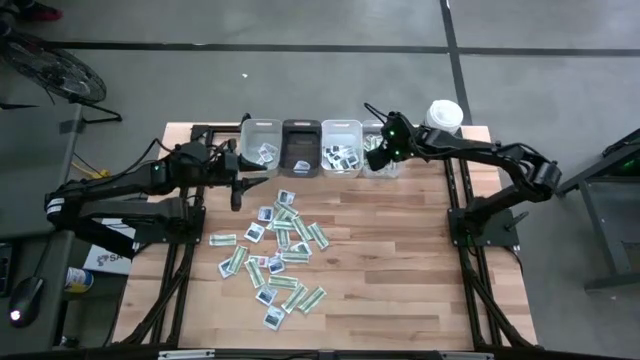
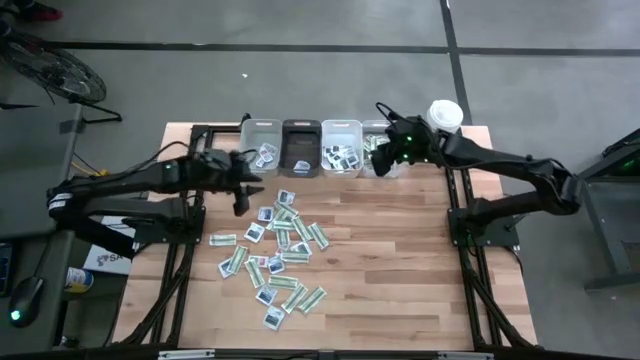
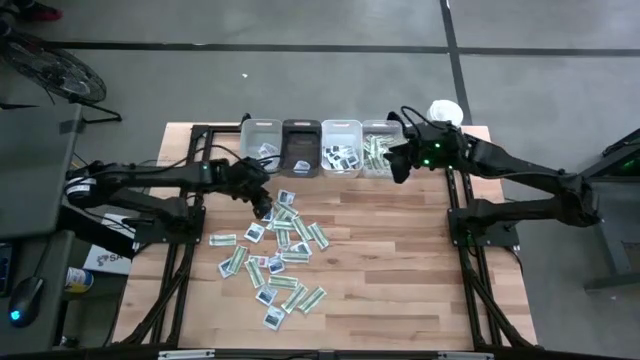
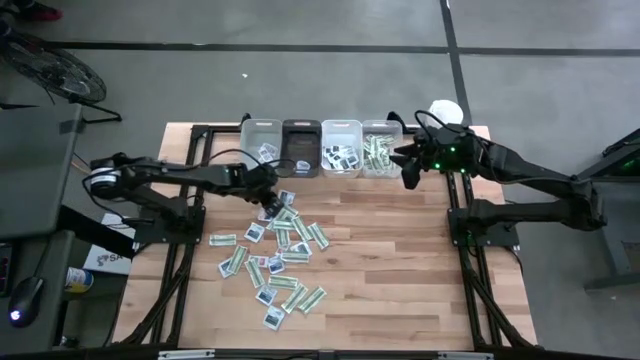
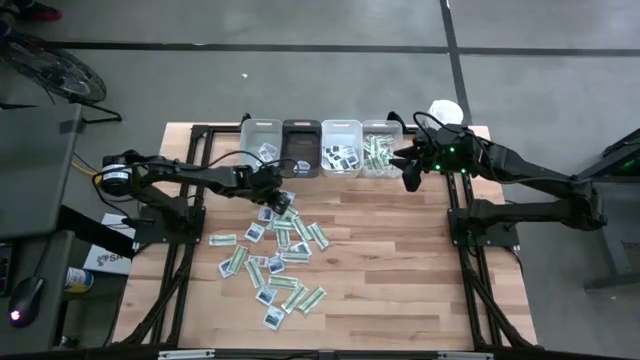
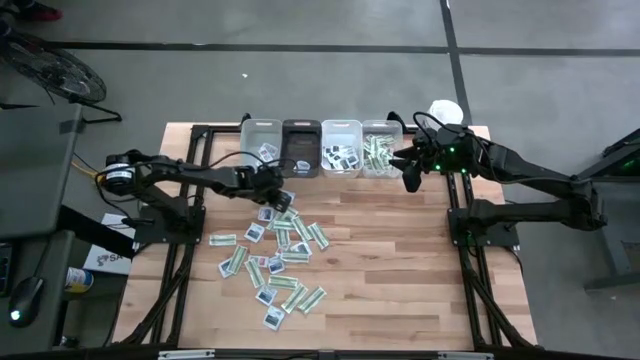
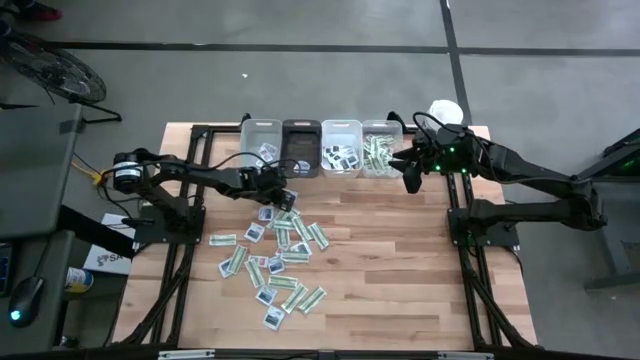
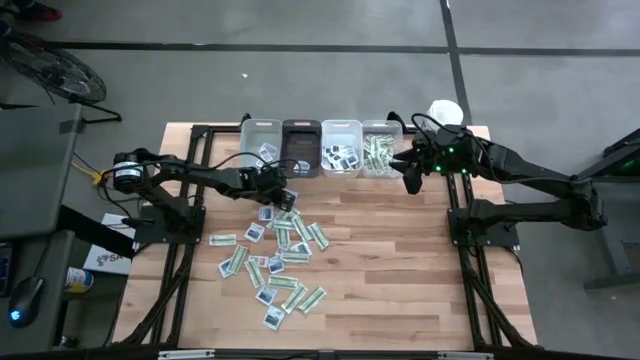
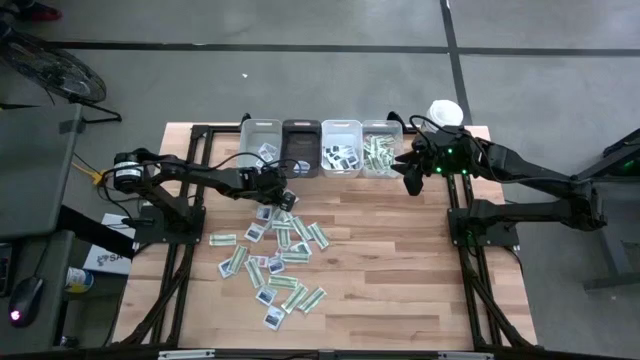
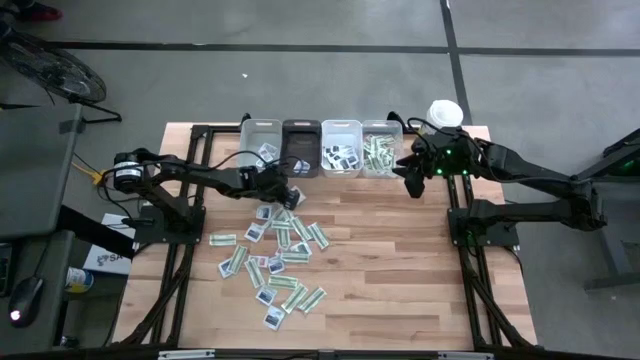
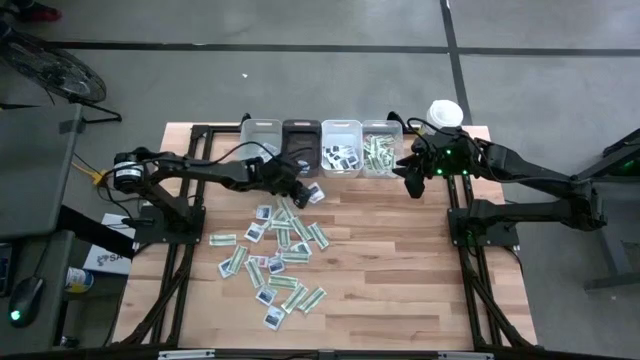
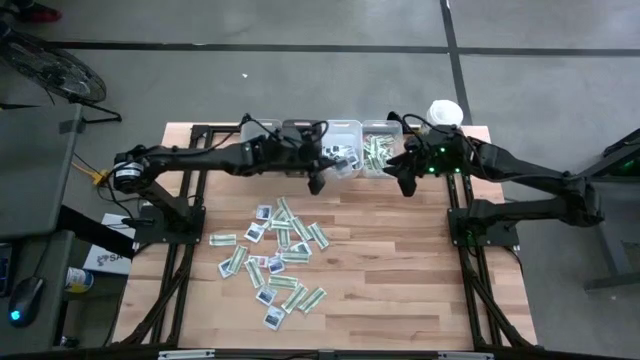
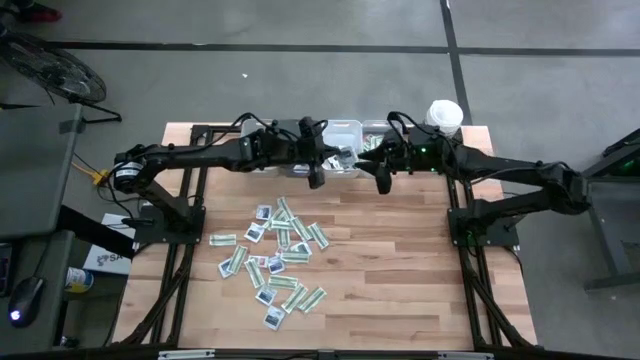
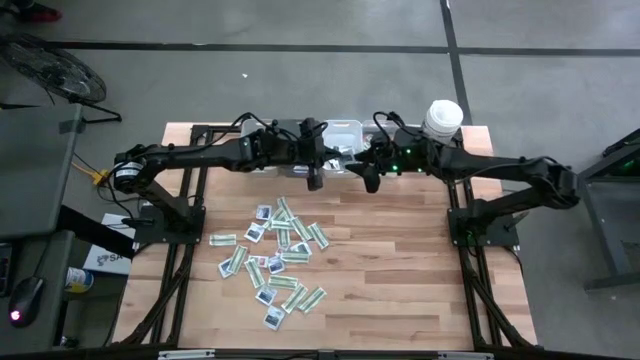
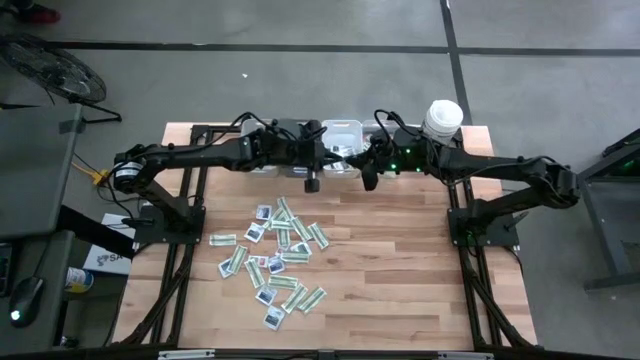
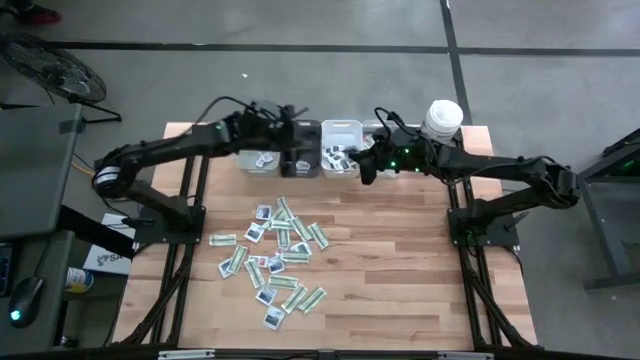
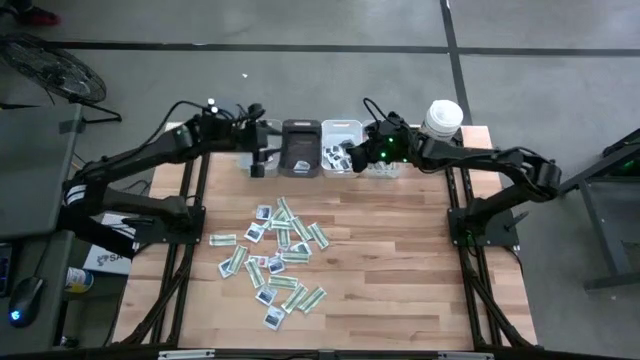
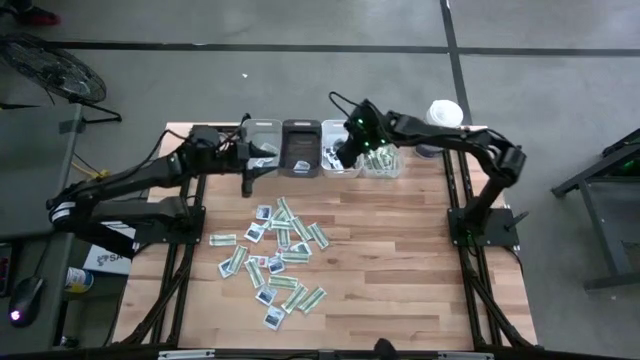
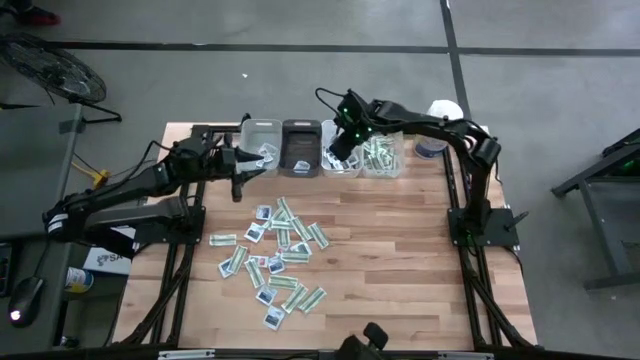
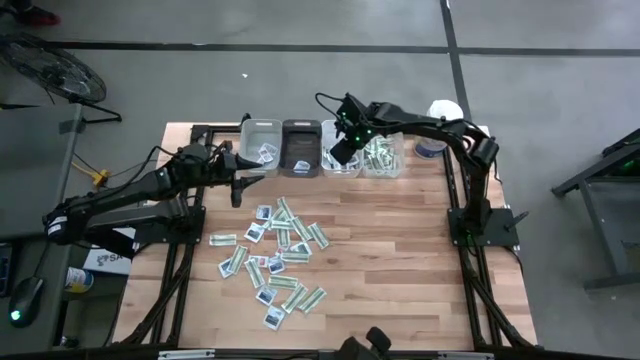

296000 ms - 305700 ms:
Task: Pick & Place First Aid Supplies
Put the black towelette pack into the white bin

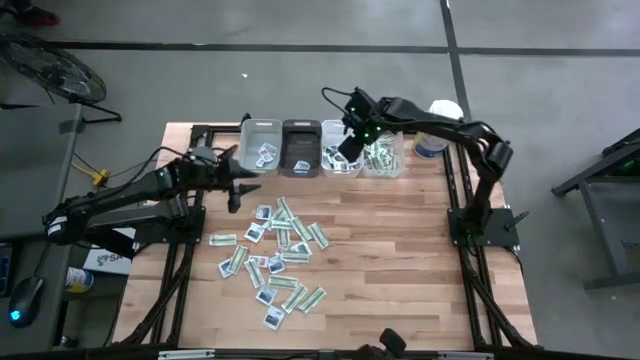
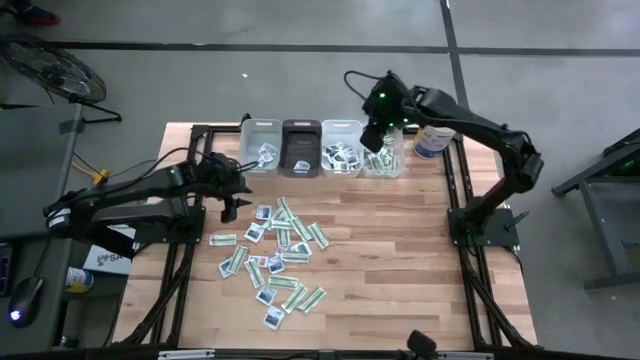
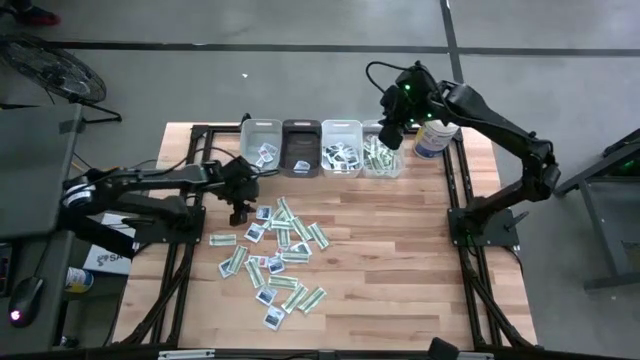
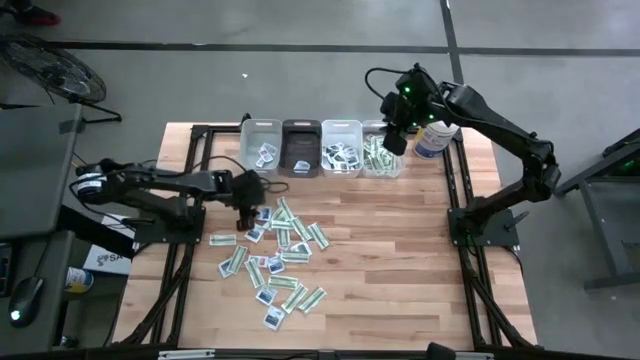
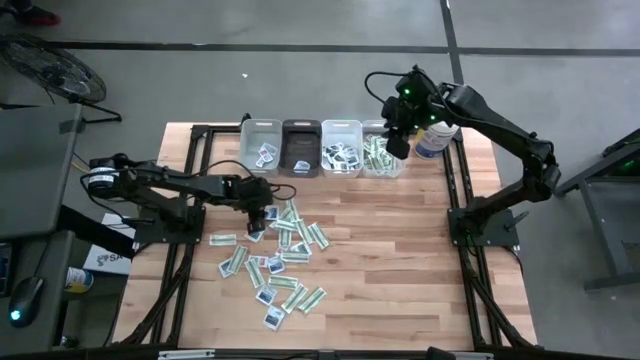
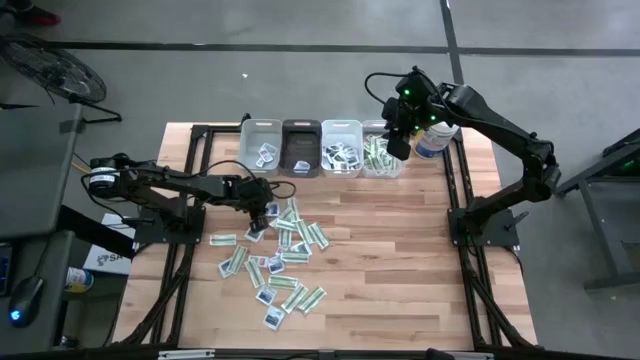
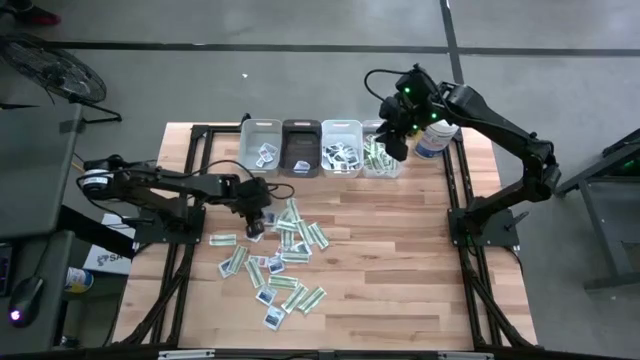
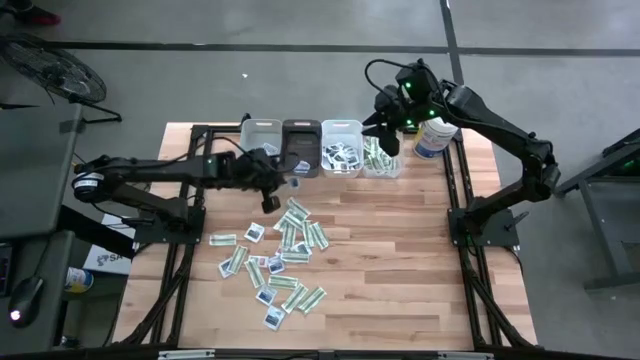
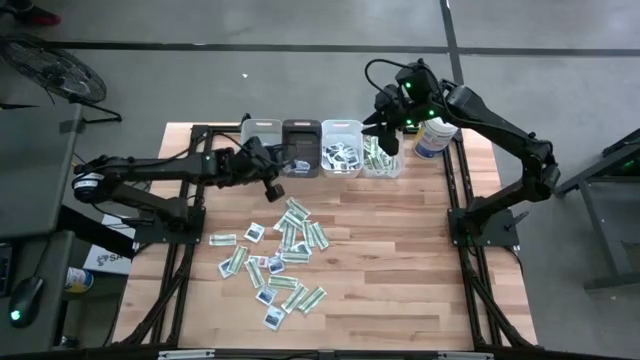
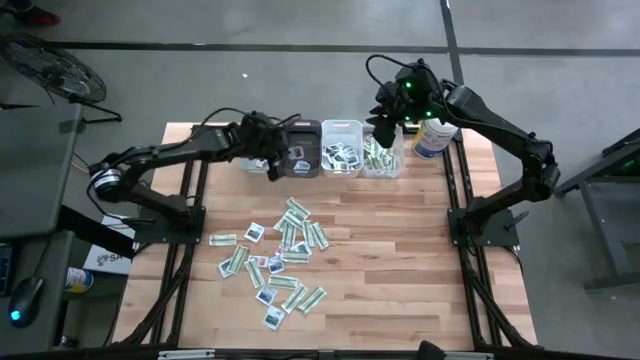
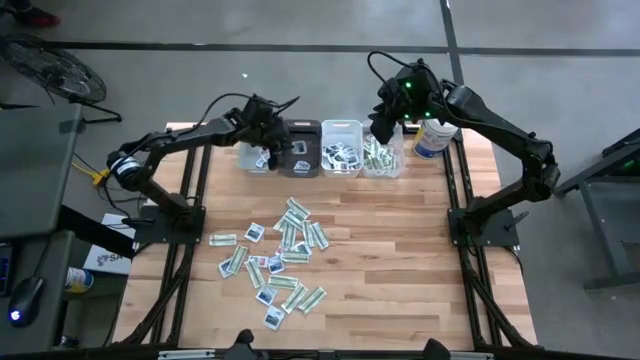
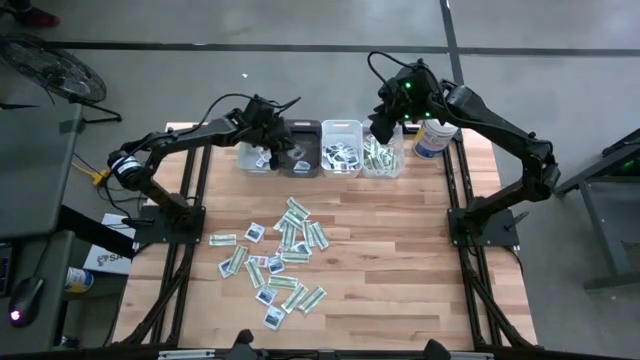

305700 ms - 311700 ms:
Put the blue alcohol pad into the black bin

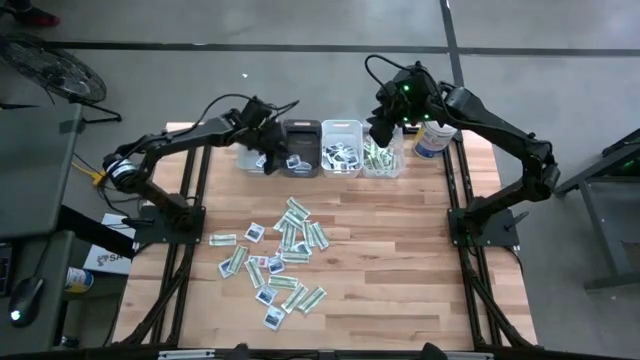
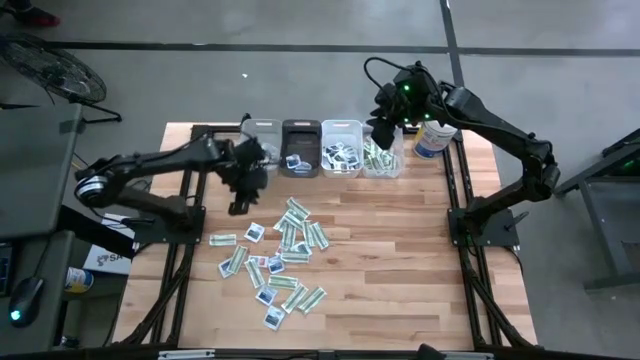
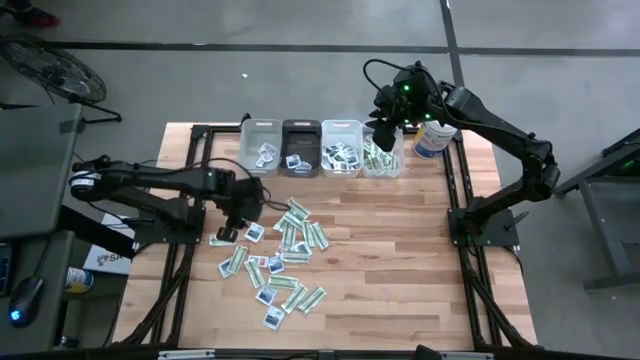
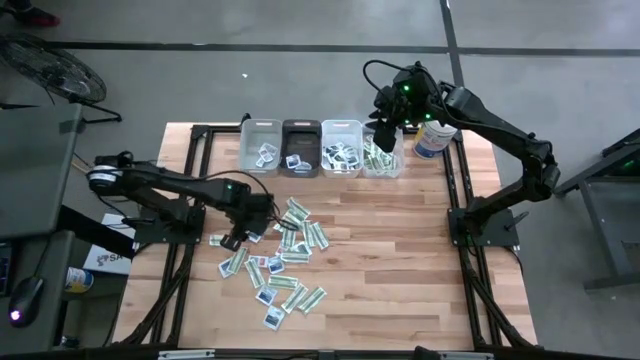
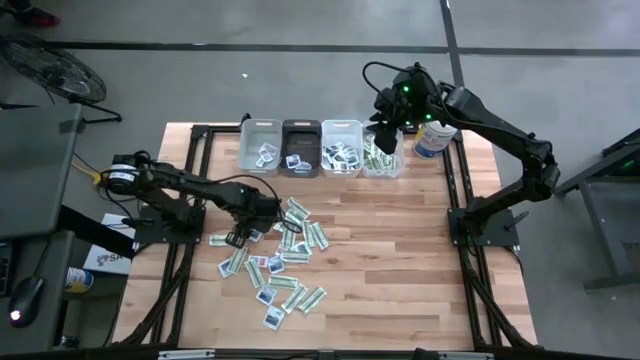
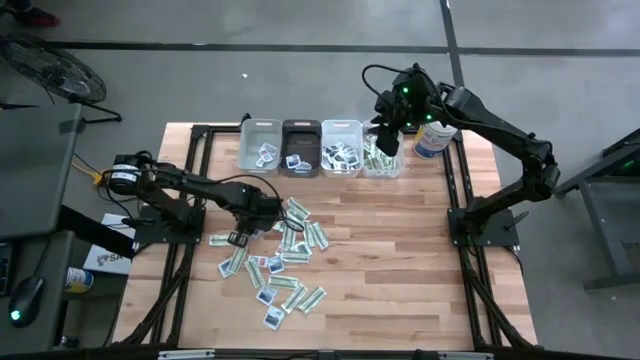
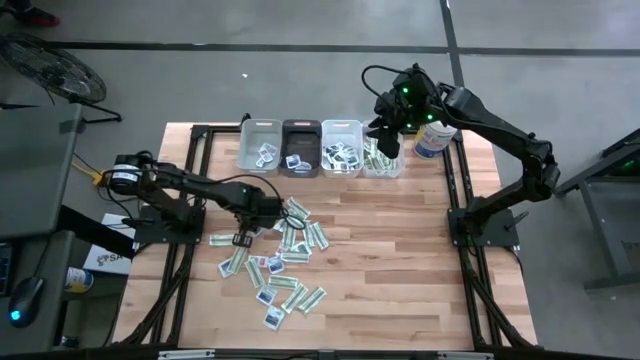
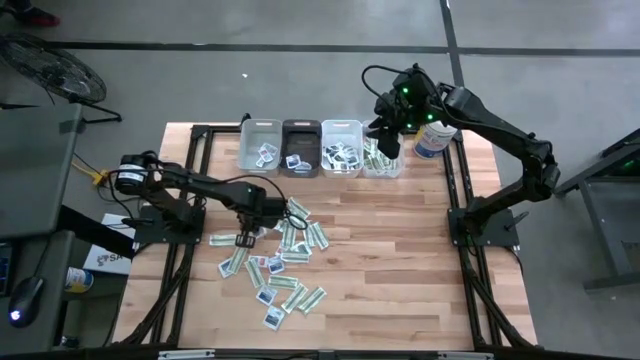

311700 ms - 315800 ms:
Put the black towelette pack into the white bin

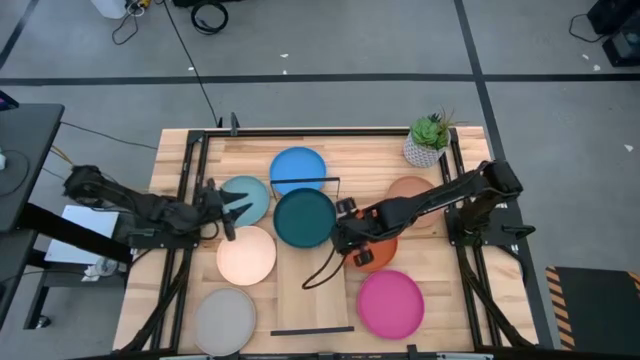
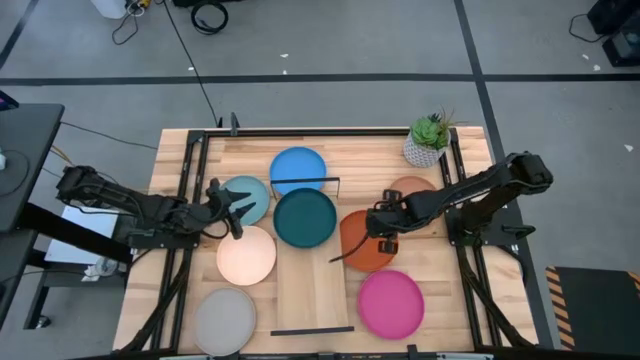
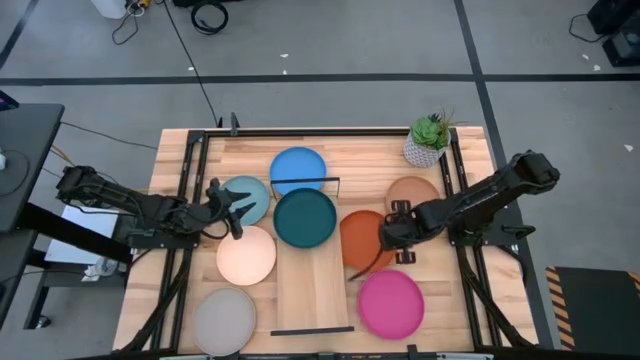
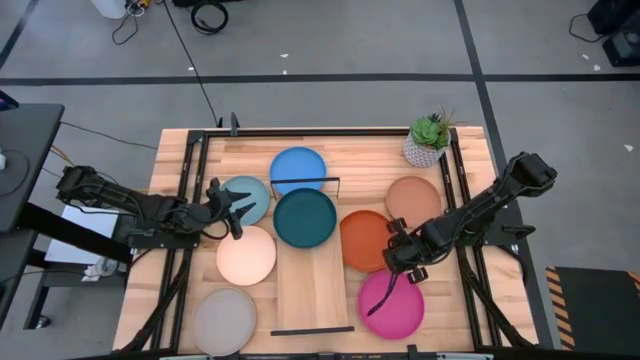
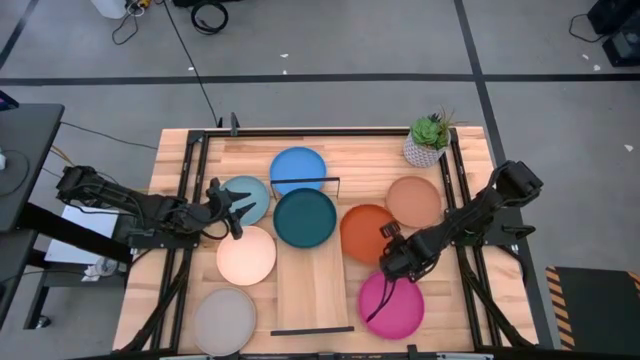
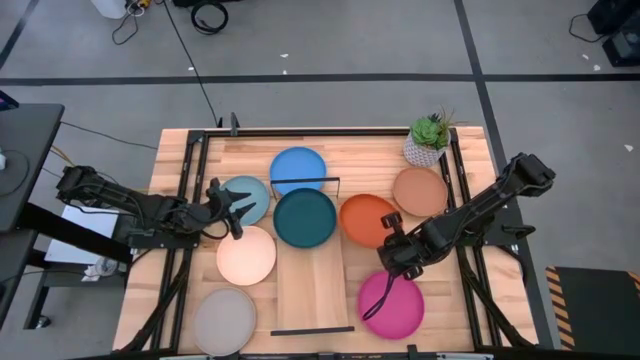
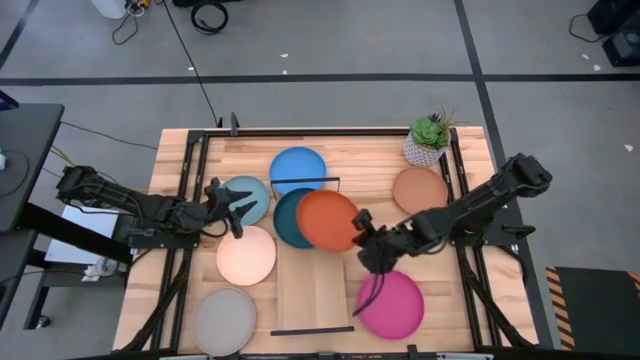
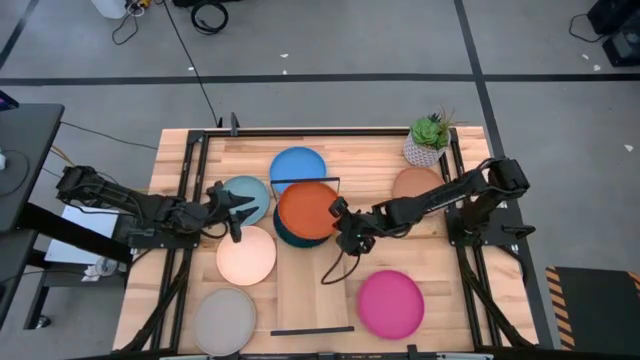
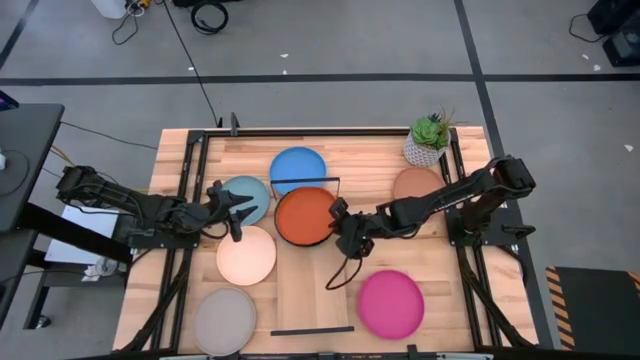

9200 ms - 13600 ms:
Task: Place and stack plates onto a shelf
Stack the orange plate on top of the dark green plate on the shelf
